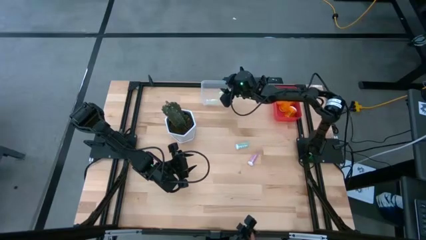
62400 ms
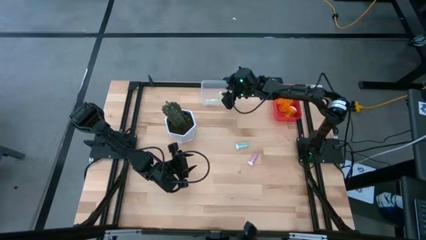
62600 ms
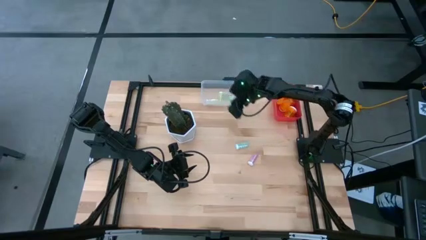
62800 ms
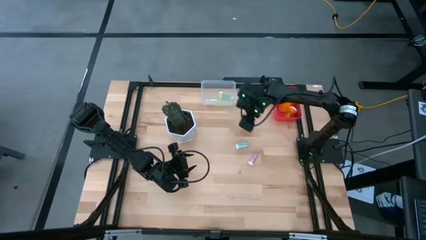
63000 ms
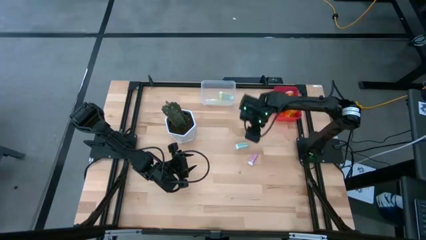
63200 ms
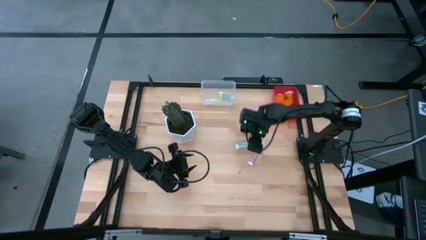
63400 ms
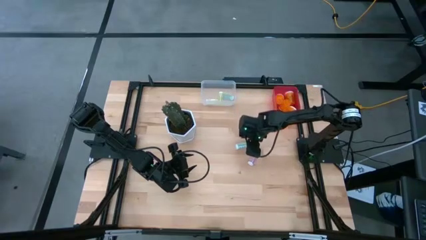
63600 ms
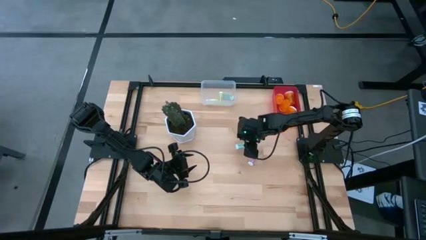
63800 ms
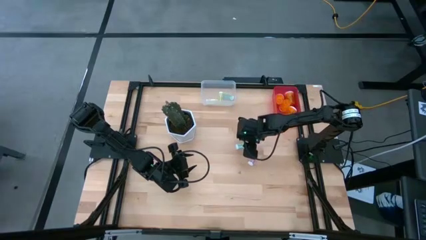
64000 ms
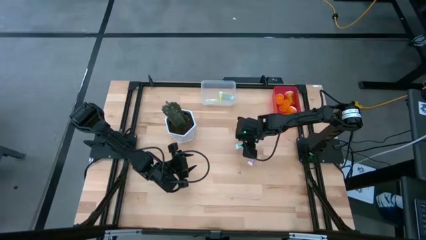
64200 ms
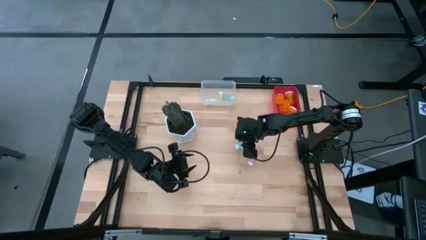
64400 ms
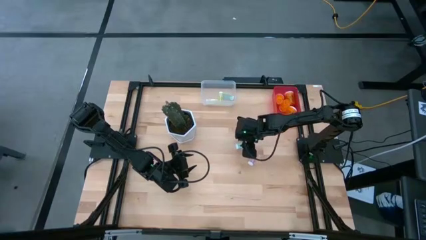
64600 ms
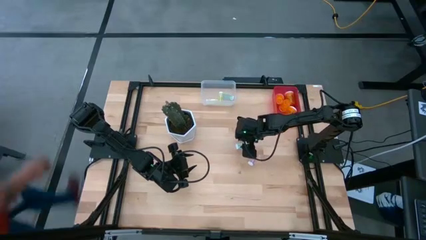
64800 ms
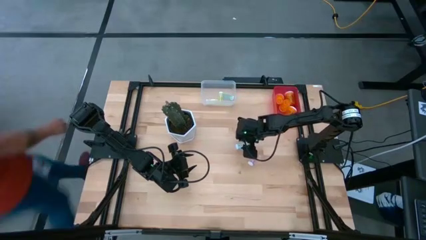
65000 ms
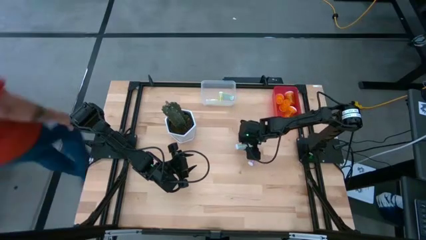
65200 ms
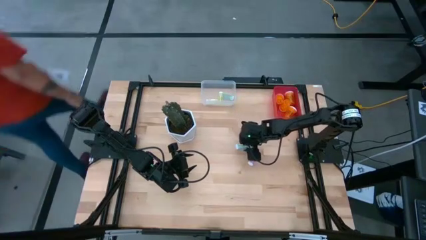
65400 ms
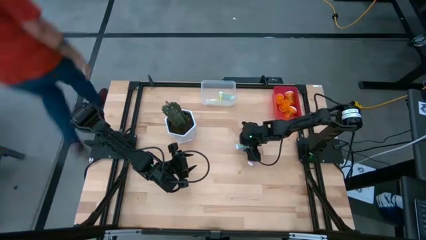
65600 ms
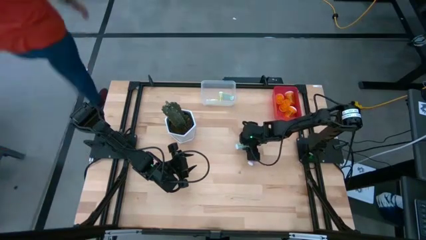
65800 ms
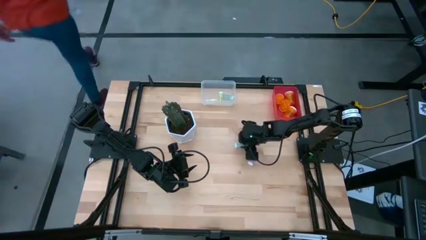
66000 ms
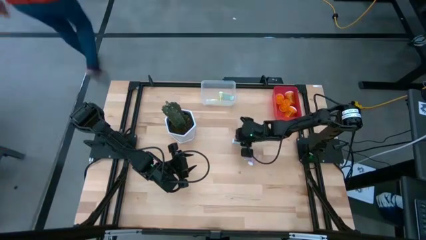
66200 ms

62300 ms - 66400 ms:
Task: Pick and place medicine bottles into bin by pill shape (circle, oval)
Put the small green pill bottle into the white bin

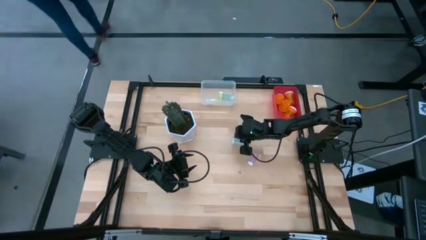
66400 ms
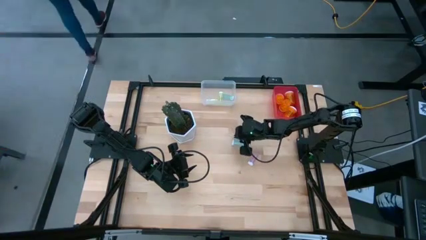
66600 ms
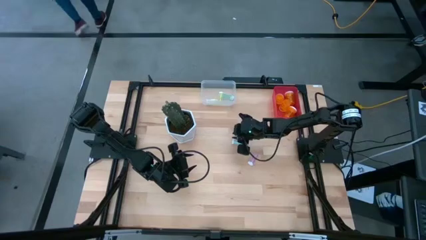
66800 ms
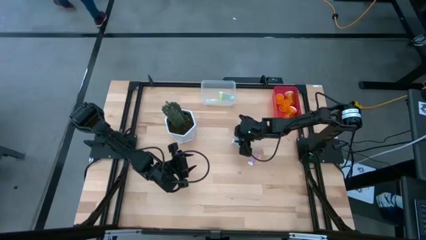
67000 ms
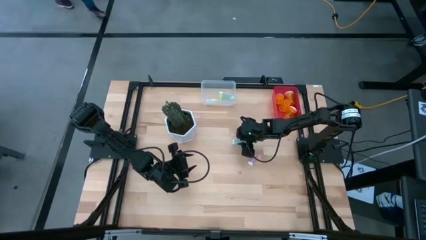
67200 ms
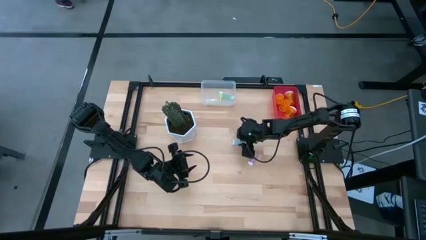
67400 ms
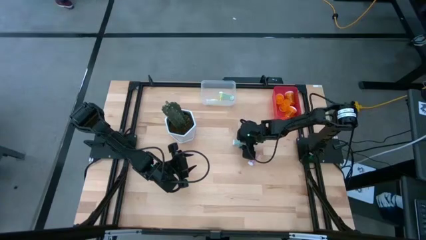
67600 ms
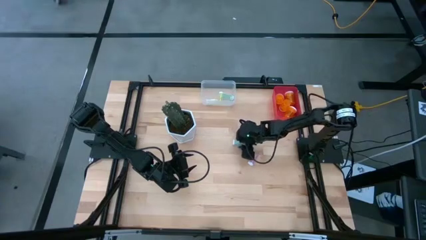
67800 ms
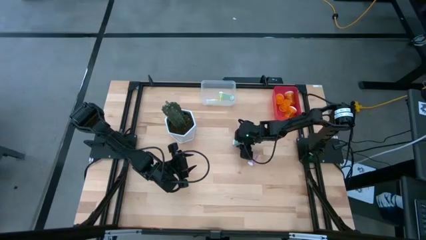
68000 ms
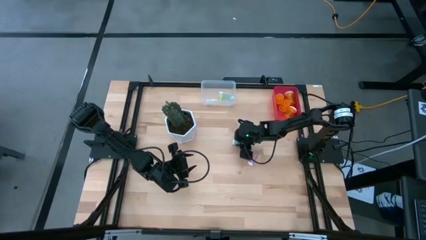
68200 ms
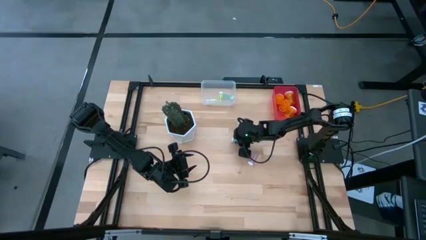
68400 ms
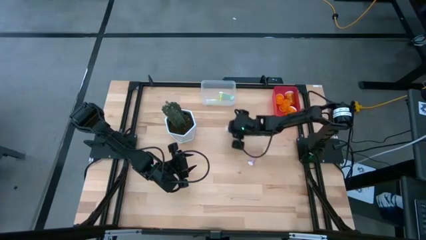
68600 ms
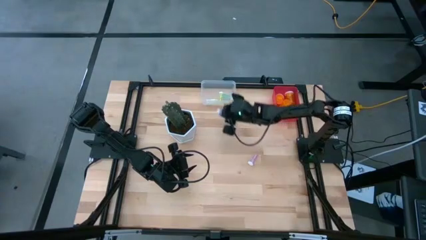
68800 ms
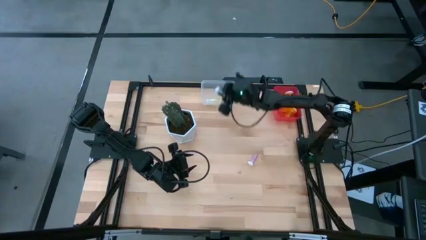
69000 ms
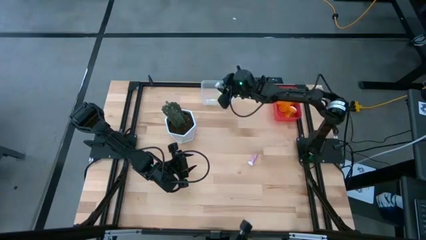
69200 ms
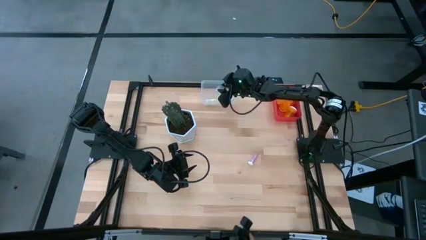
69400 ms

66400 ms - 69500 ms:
Put the small green pill bottle into the white bin

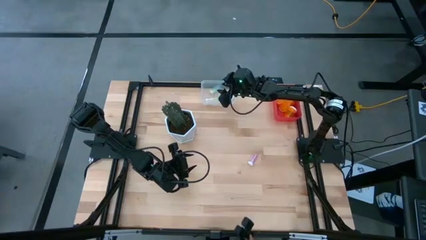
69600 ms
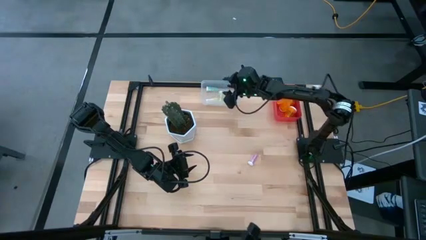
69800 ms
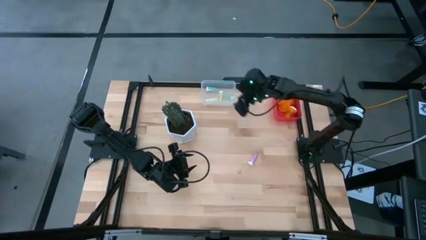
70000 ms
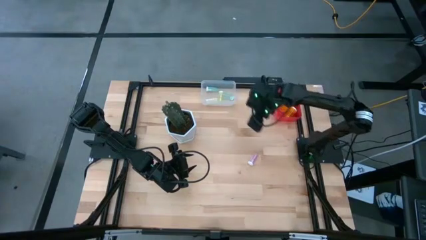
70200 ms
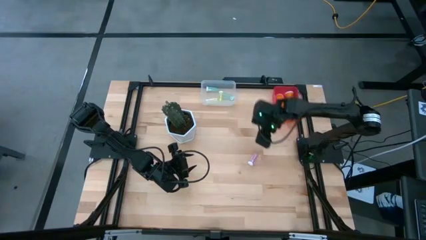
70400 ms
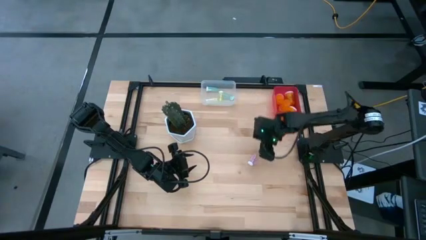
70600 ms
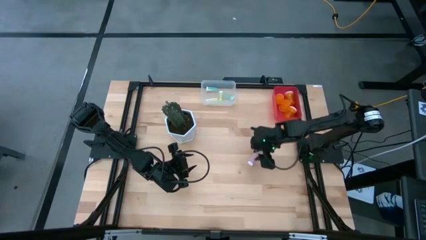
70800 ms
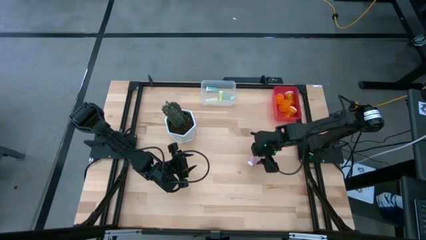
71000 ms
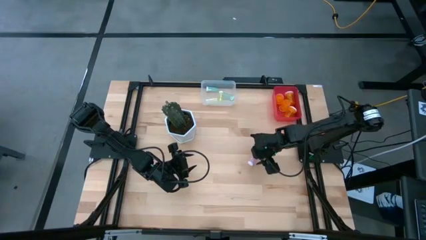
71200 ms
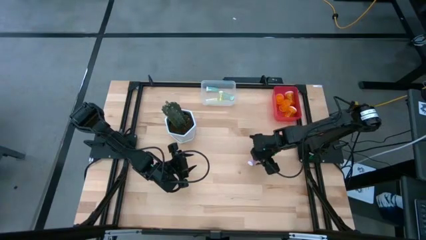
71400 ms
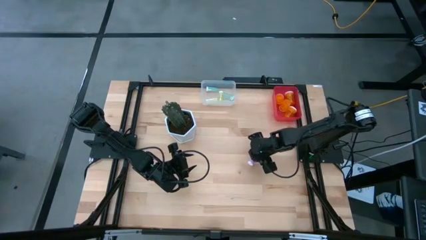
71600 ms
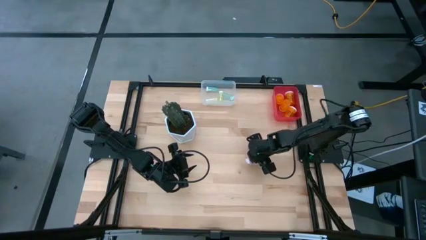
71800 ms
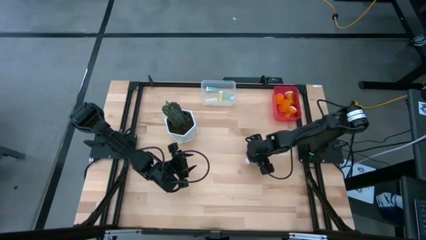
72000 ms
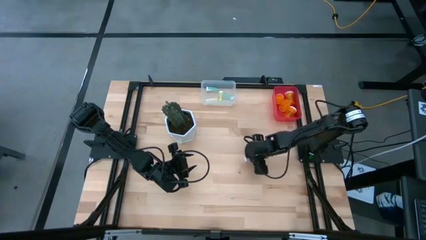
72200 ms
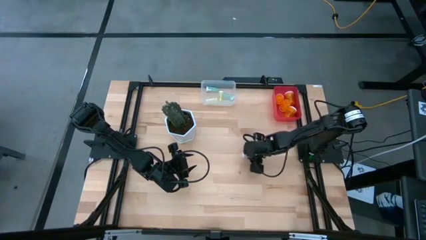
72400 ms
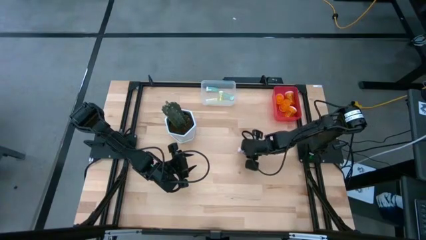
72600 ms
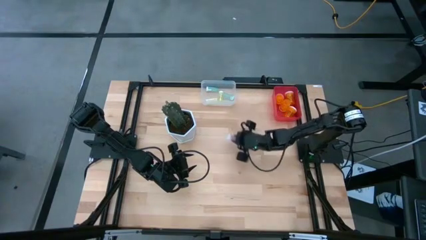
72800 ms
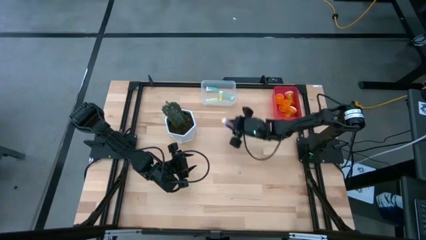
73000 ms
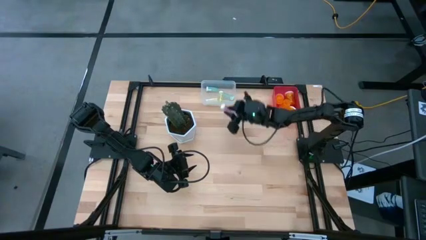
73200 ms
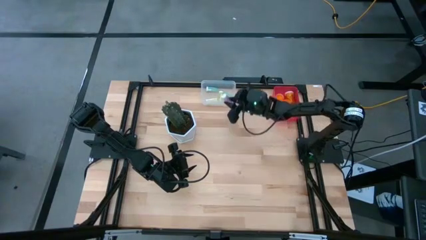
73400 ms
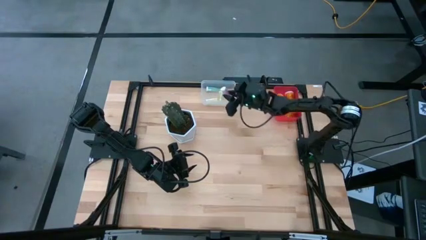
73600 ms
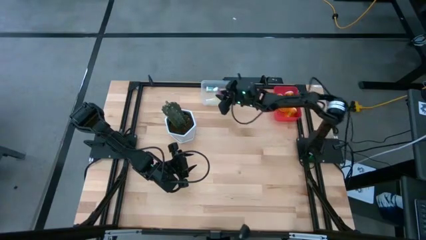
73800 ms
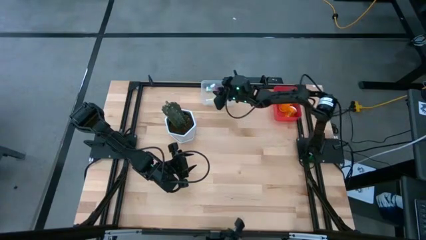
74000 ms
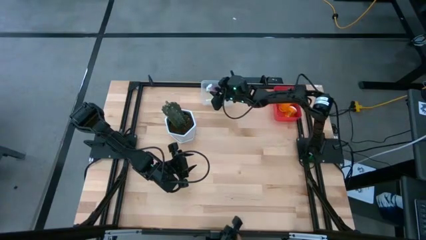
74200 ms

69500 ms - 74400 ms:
Put the small pink pill bottle into the white bin

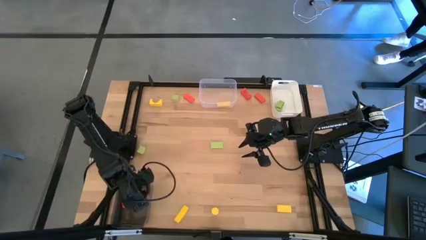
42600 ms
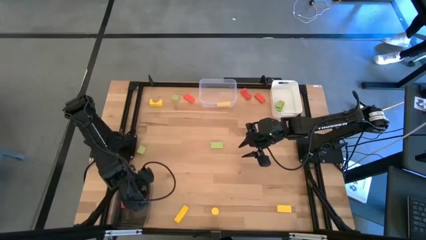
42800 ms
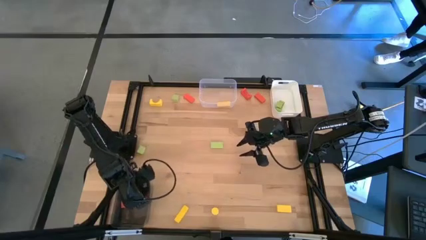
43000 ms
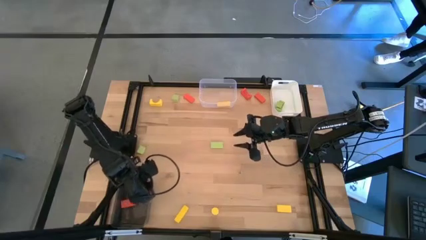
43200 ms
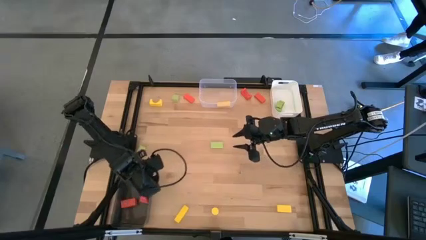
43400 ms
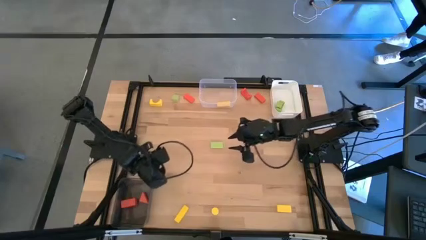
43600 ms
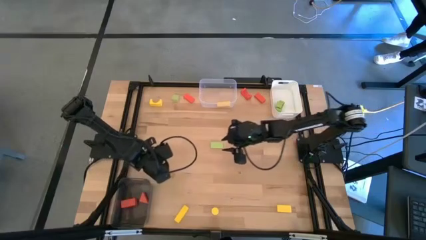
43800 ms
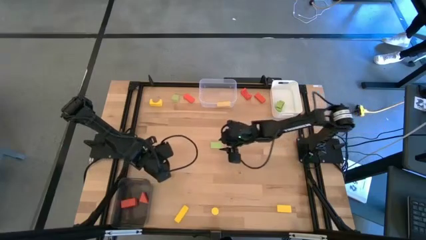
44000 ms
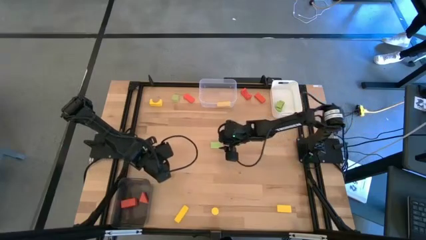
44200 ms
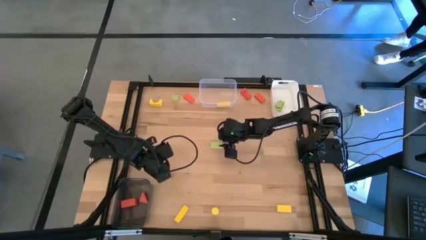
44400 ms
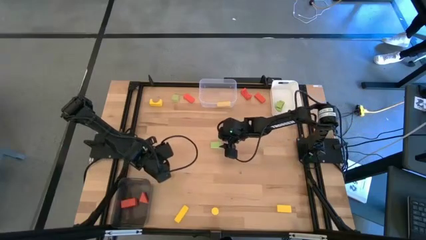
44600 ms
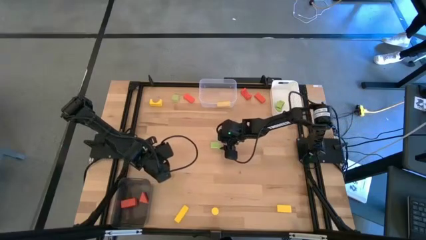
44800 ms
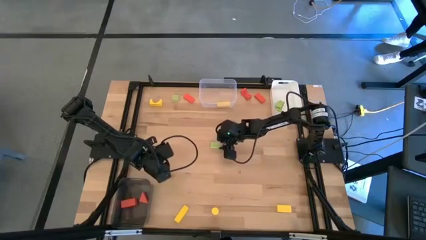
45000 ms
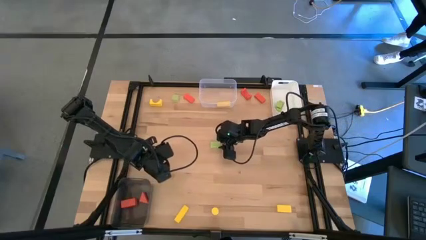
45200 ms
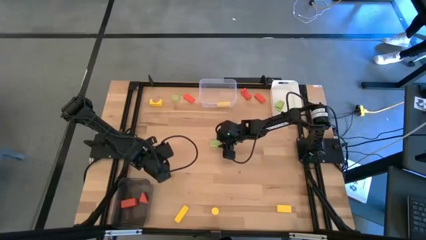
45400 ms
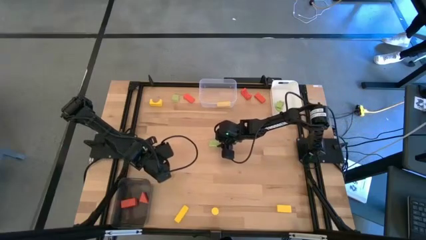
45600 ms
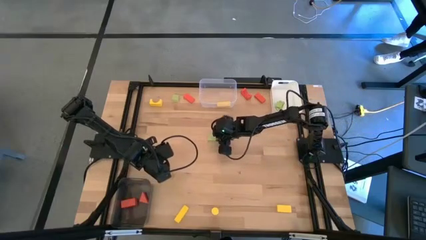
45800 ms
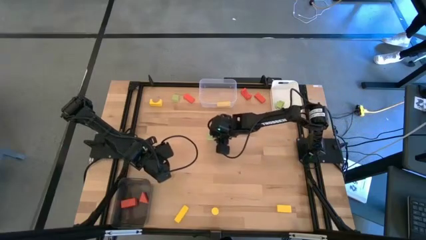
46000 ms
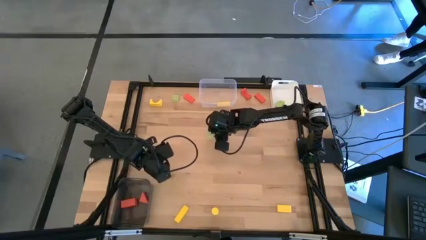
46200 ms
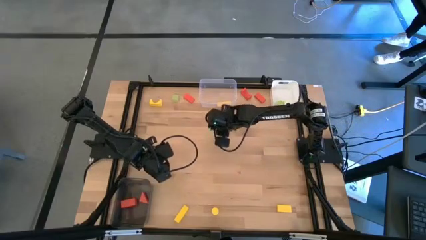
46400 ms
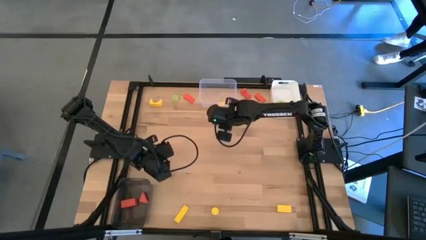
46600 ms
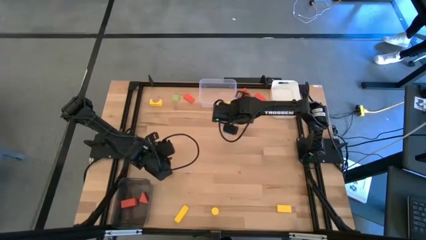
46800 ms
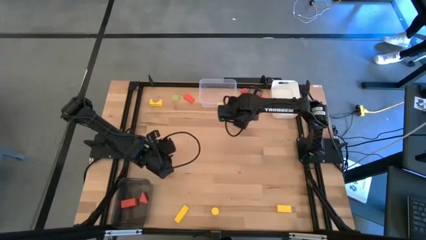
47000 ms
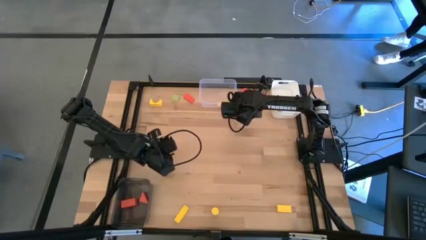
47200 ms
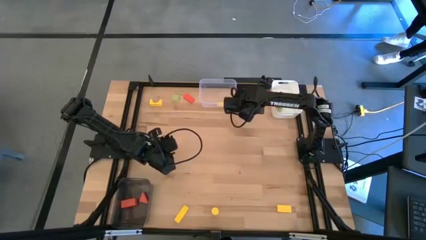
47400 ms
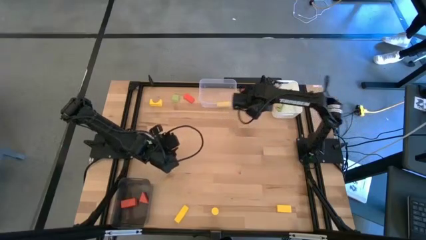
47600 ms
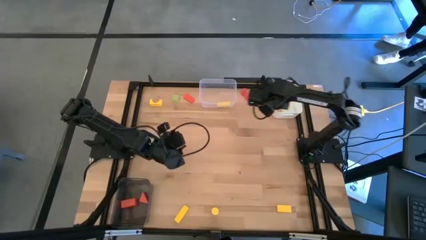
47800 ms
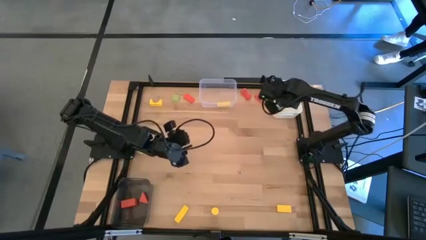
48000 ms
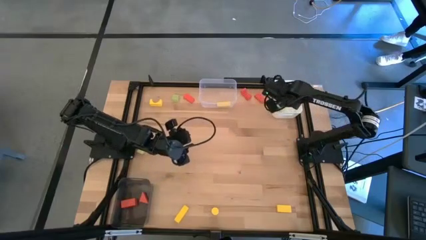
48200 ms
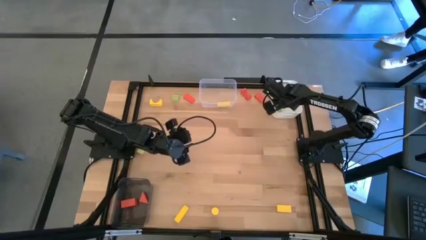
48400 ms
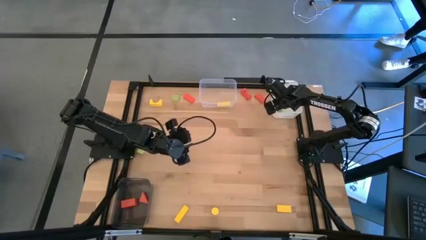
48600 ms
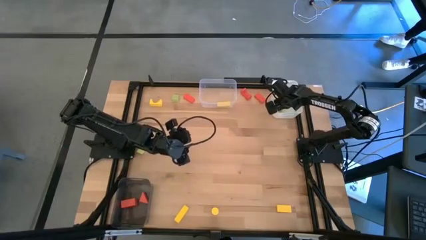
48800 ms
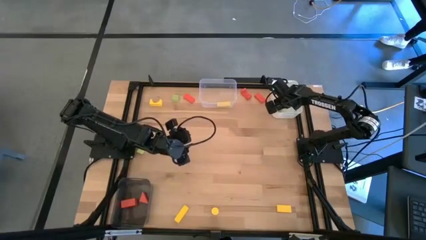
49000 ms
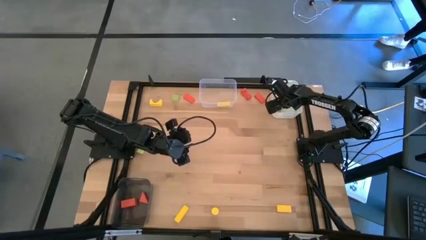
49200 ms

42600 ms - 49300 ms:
Task: Sort & place blocks by color
Put the green rectangular block into the white bin
